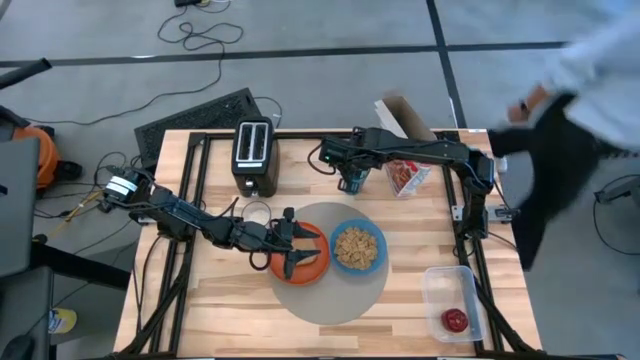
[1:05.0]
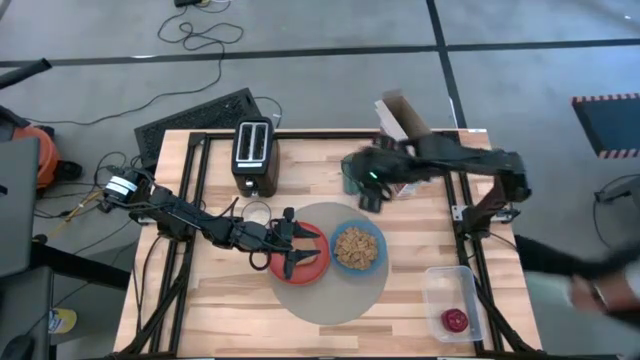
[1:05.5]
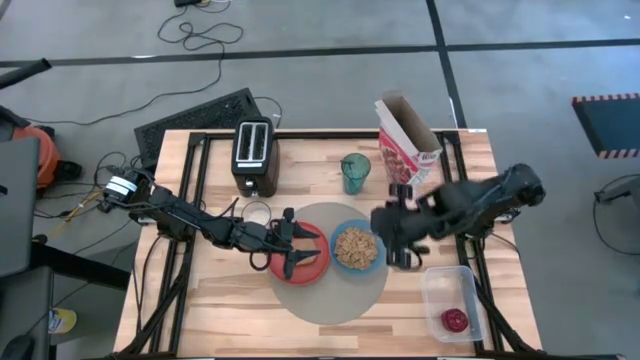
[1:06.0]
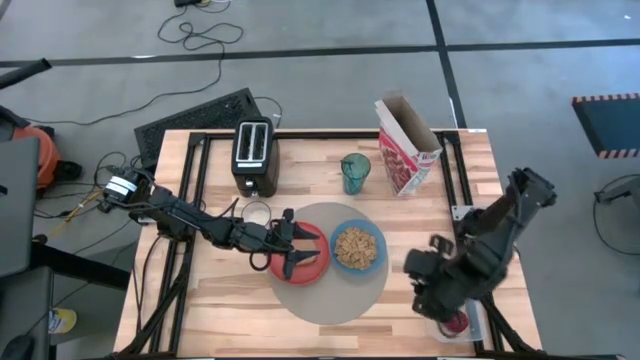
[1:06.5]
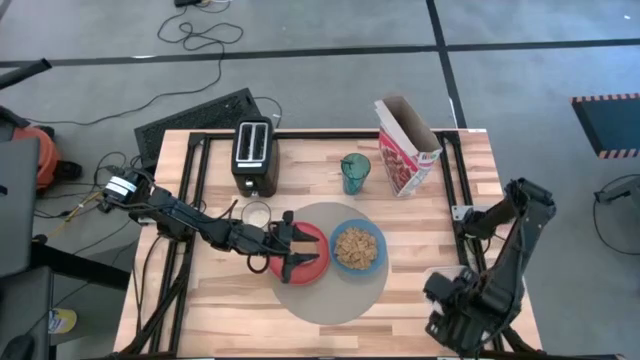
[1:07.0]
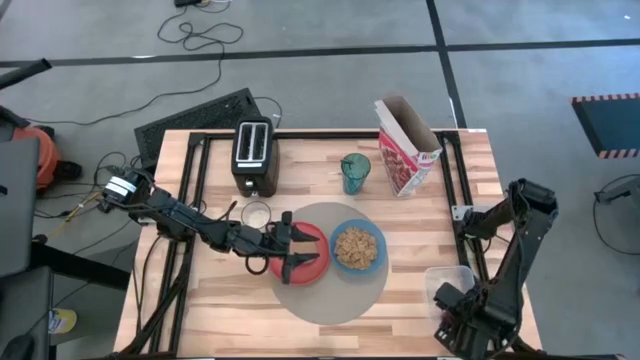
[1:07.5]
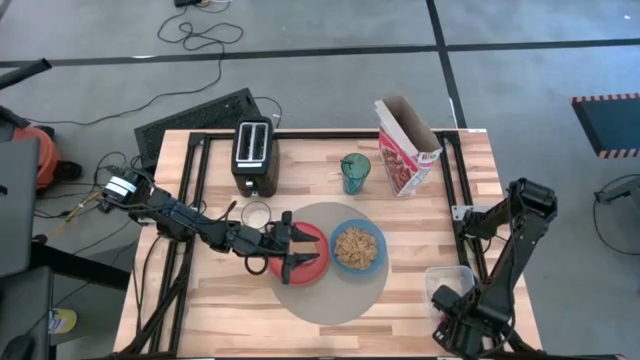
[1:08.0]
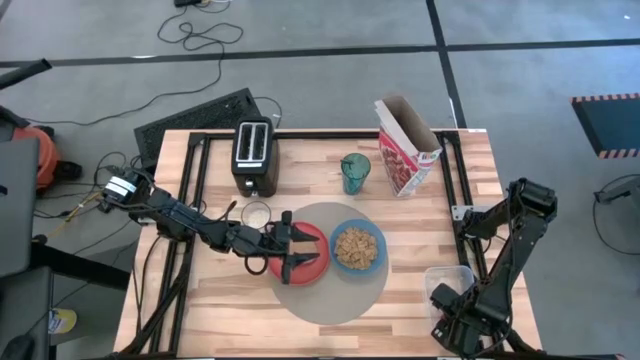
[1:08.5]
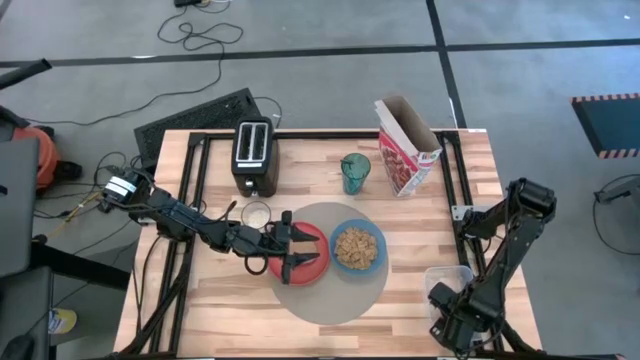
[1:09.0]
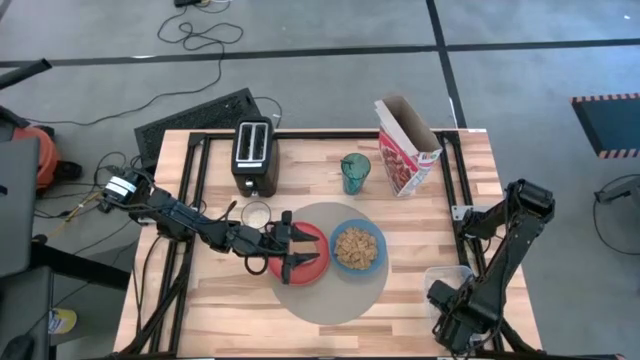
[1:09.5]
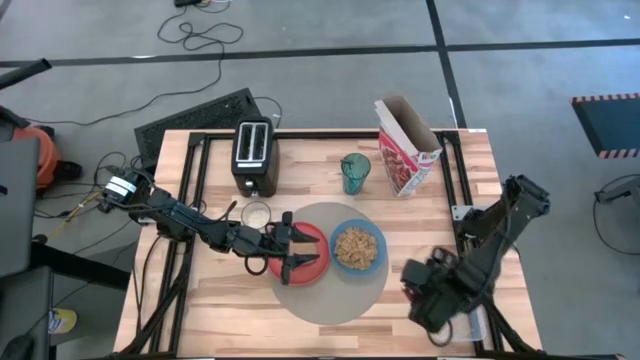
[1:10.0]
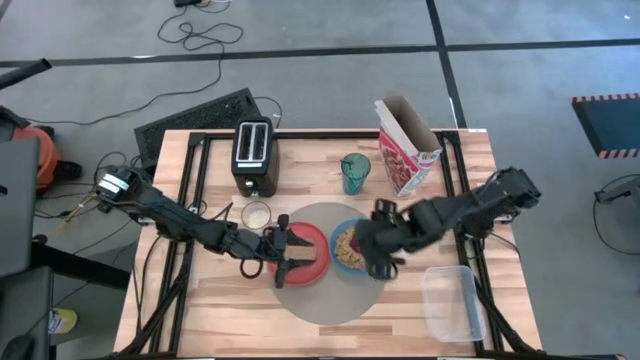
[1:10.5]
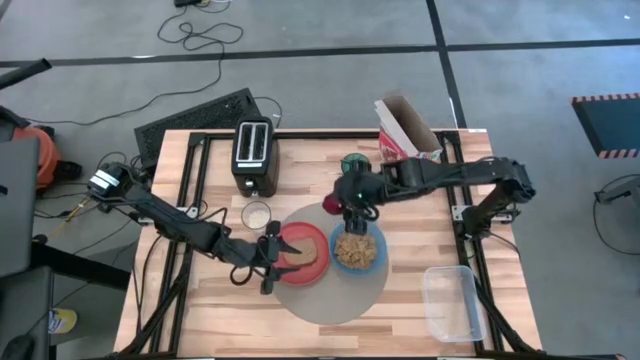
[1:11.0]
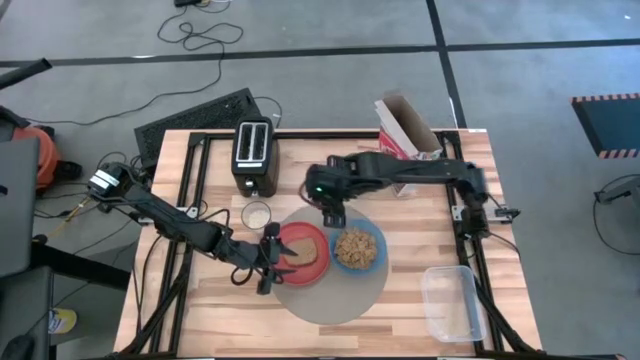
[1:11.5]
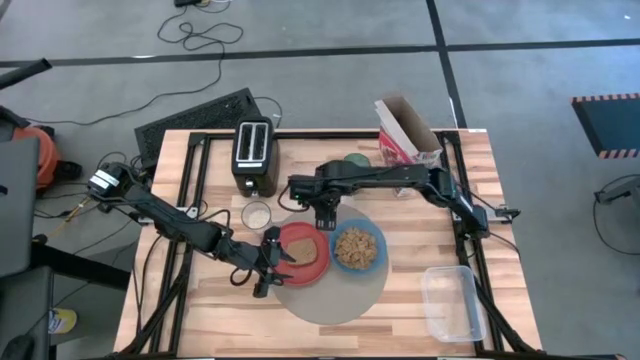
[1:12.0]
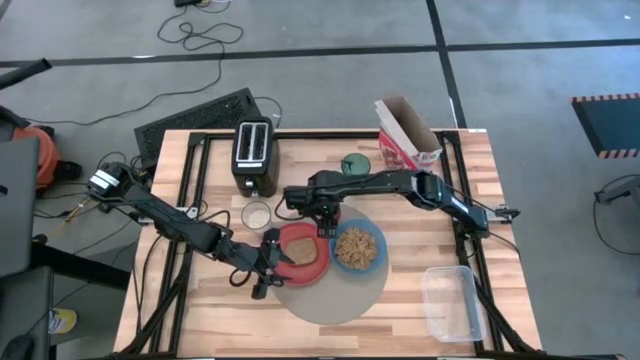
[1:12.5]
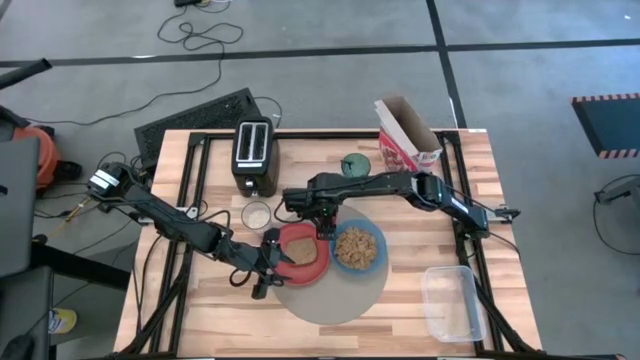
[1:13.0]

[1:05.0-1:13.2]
Task: Arrange a breakfast setting
Put the apple on the top center of the placemat

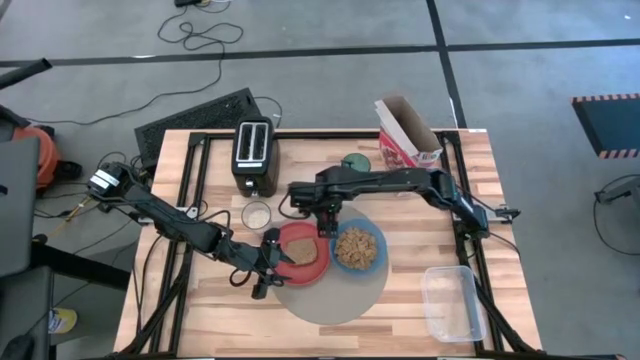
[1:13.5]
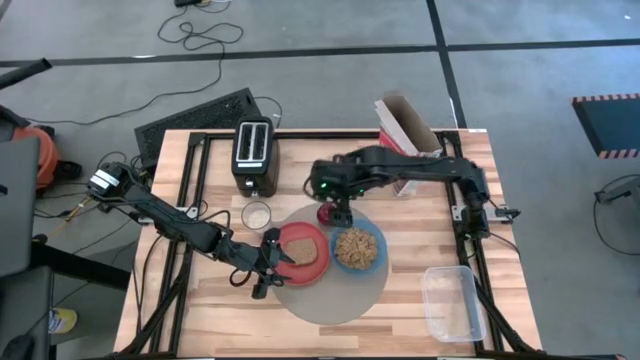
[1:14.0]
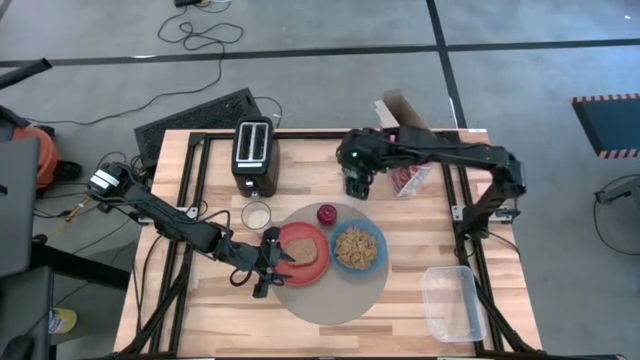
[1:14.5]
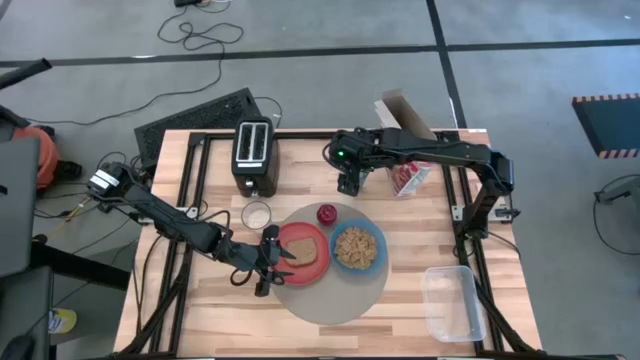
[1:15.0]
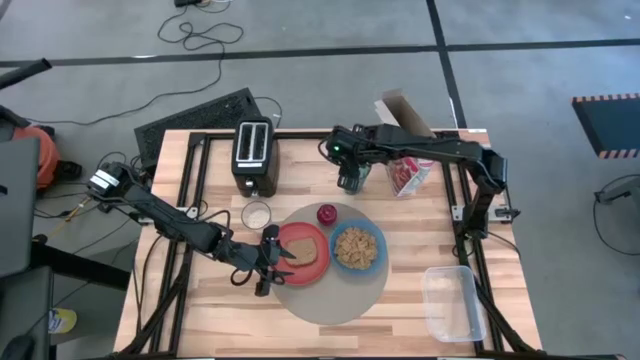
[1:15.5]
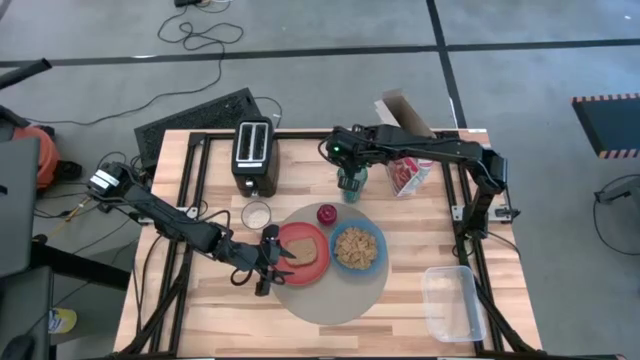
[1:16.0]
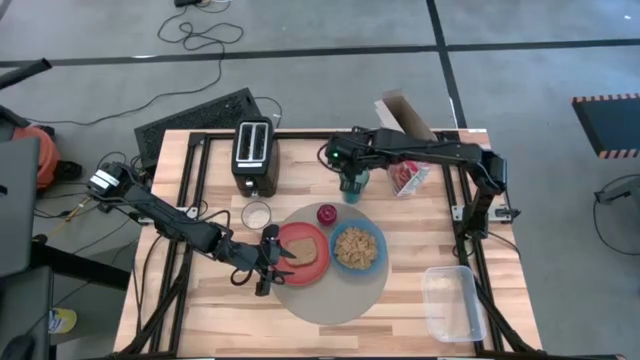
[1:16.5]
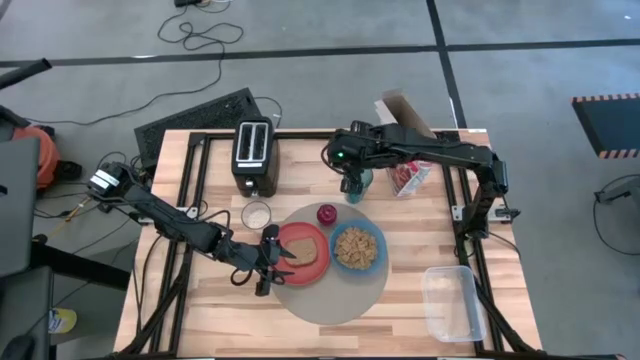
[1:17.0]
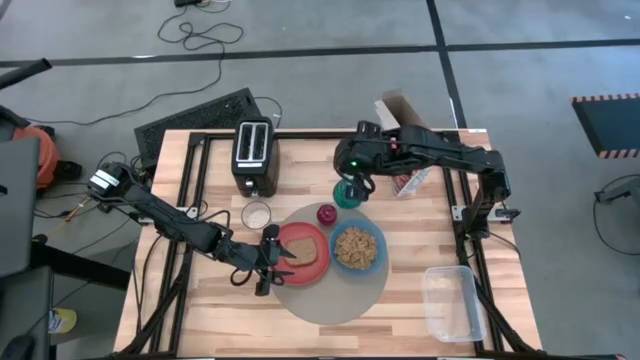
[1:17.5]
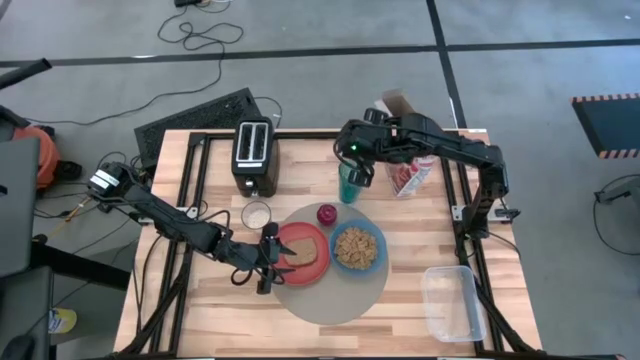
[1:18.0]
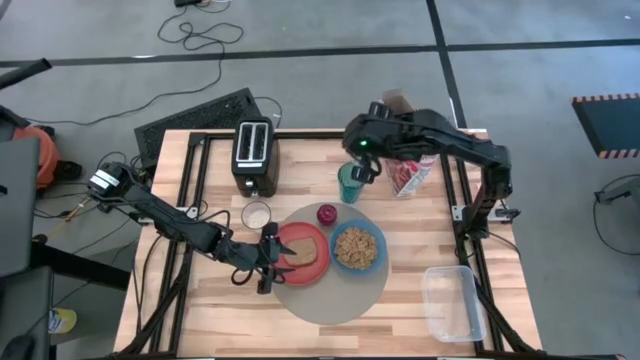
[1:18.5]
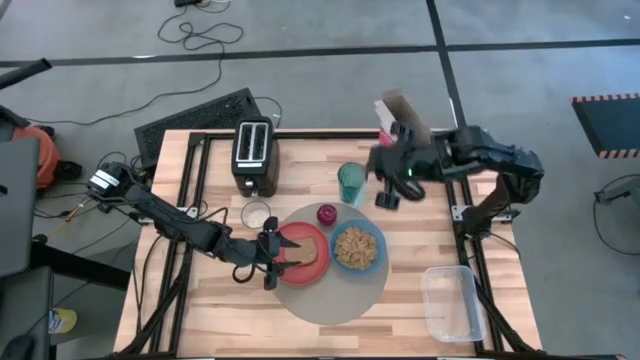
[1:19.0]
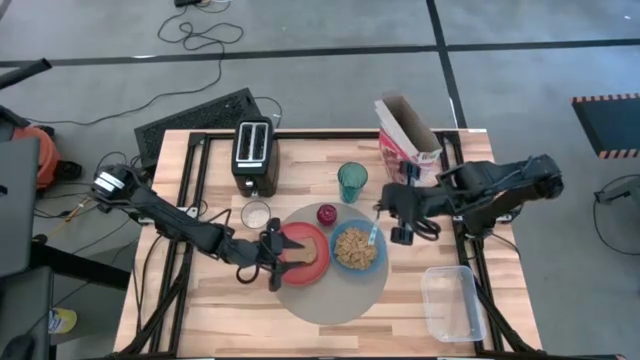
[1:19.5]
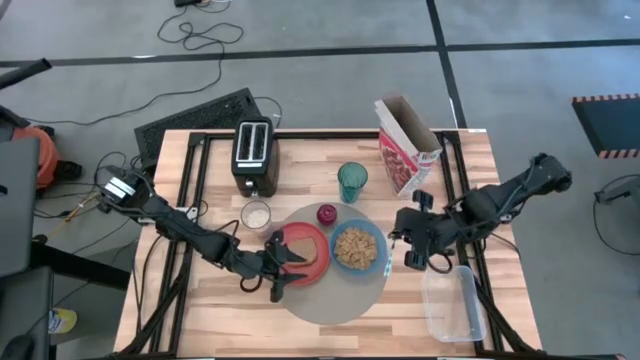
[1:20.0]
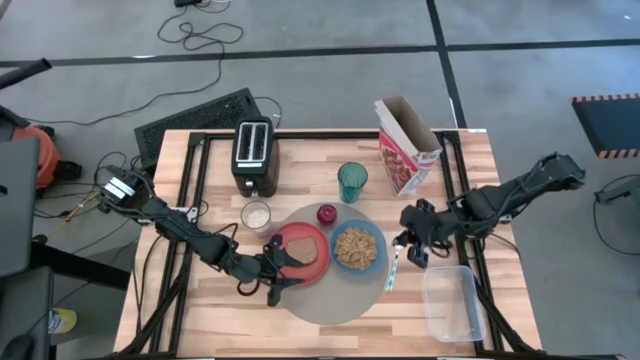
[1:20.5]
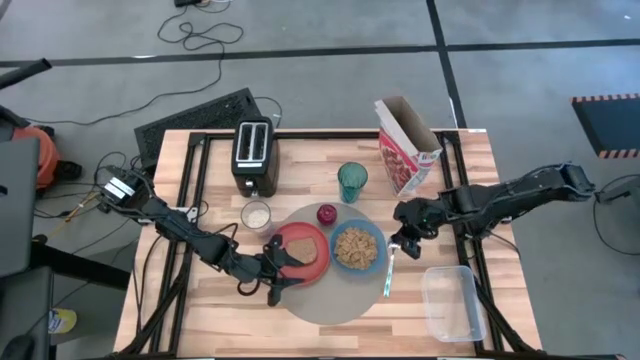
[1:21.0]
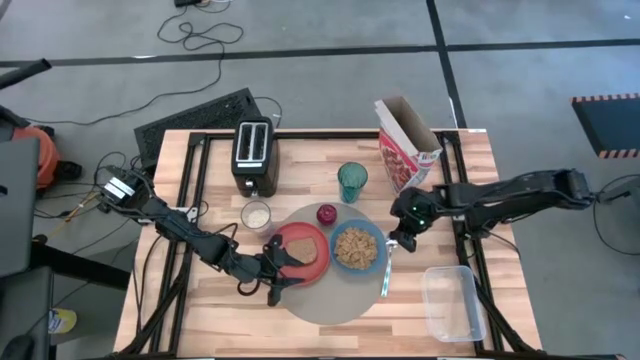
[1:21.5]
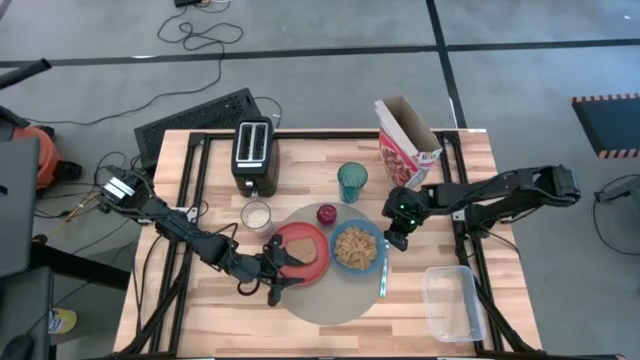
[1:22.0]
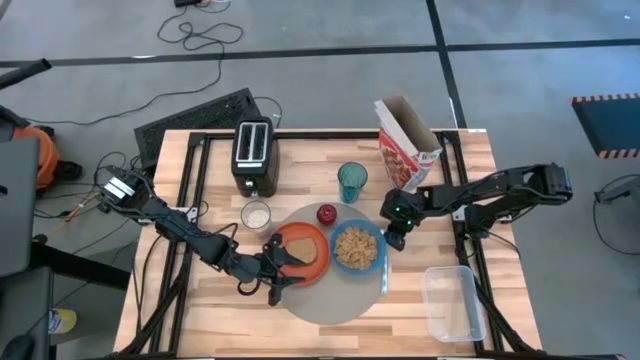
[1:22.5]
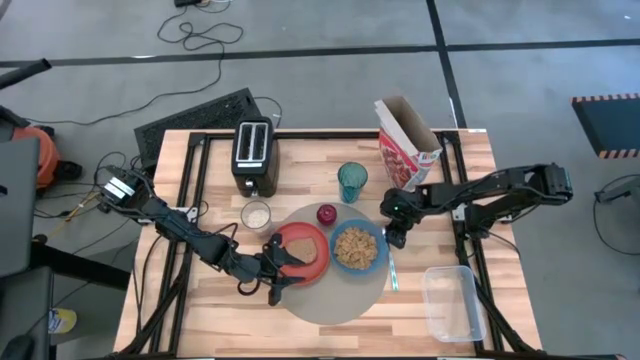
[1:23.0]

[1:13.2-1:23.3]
Move the spoon to the right of the placemat

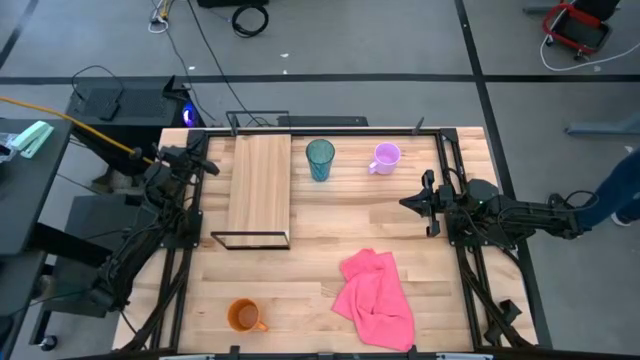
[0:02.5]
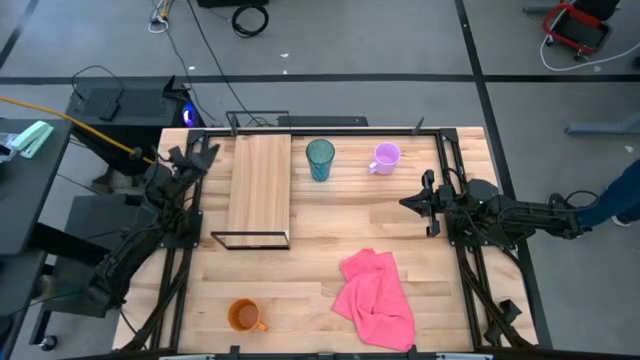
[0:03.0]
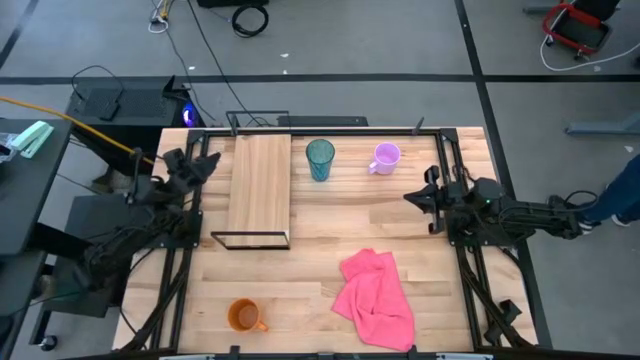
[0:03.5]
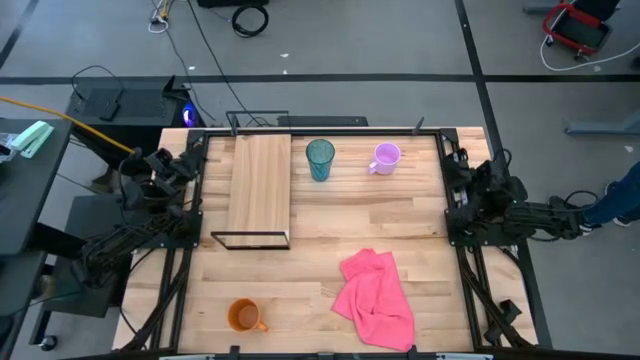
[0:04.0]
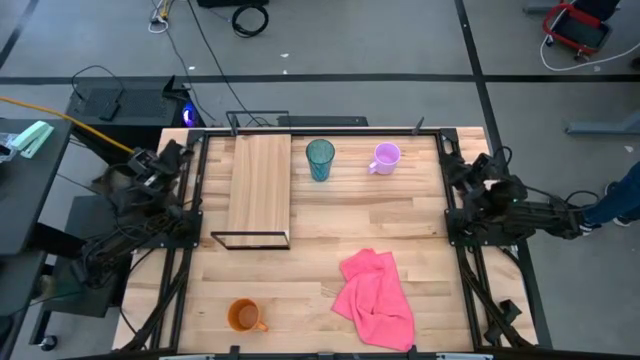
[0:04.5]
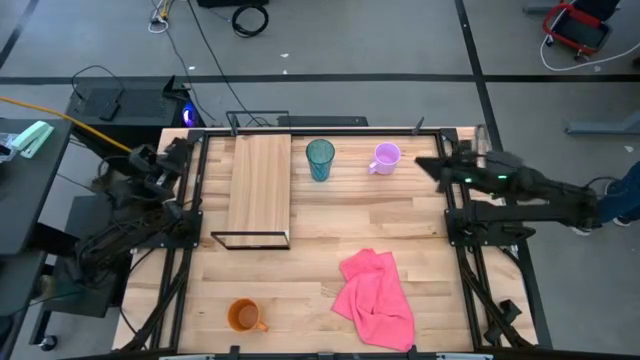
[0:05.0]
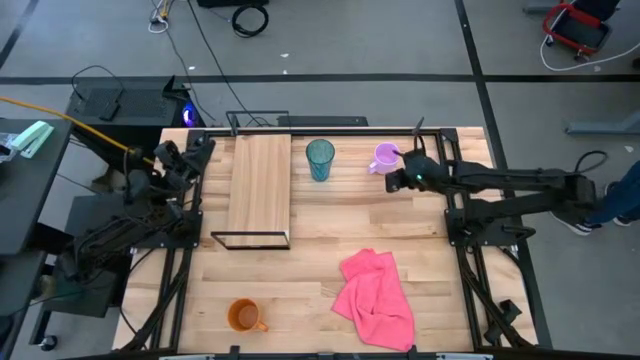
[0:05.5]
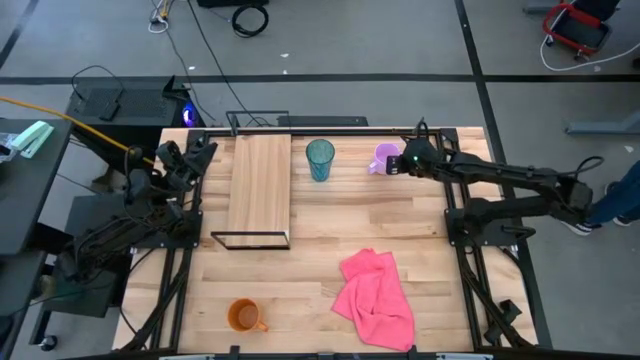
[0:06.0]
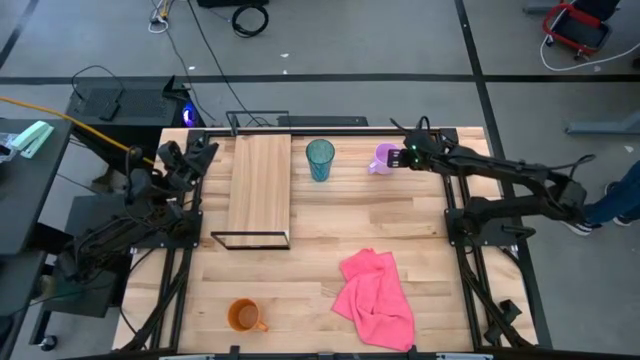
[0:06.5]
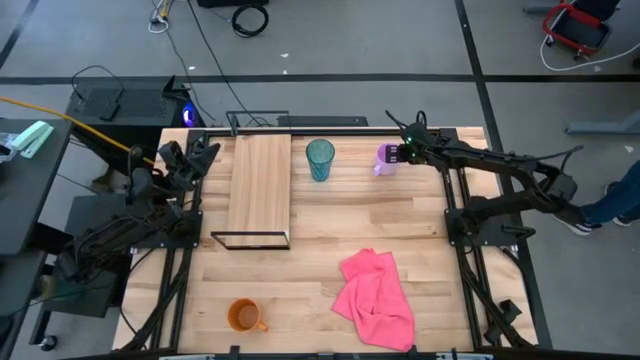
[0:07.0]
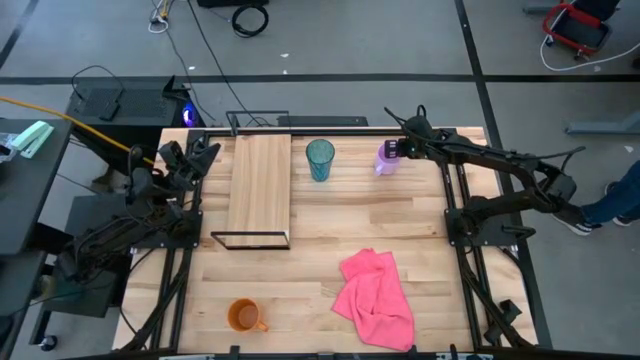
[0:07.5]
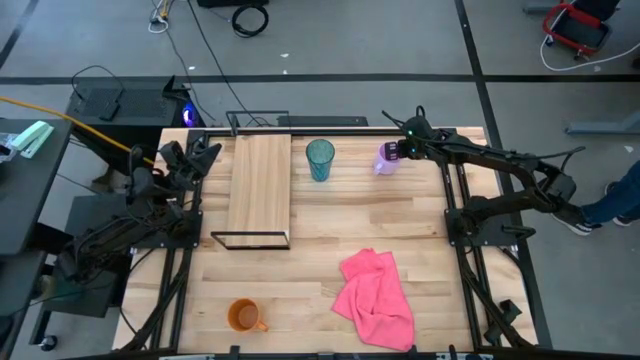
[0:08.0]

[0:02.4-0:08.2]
Task: Stack small to large cups/mugs on shelf
Put the pink mug on the shelf
